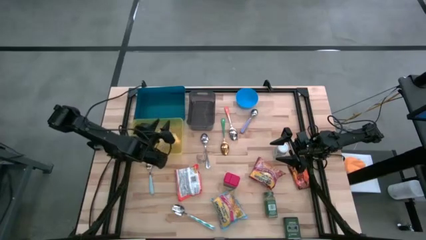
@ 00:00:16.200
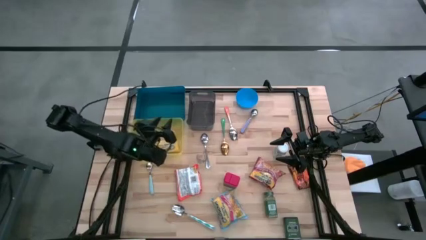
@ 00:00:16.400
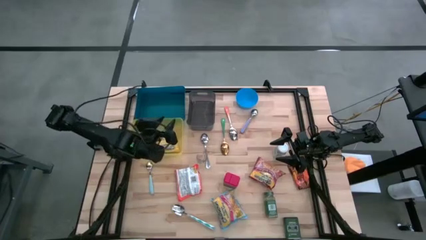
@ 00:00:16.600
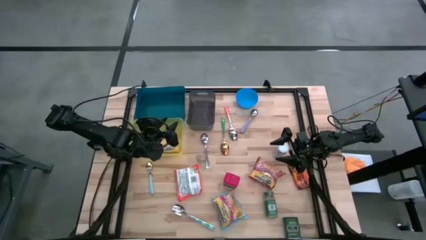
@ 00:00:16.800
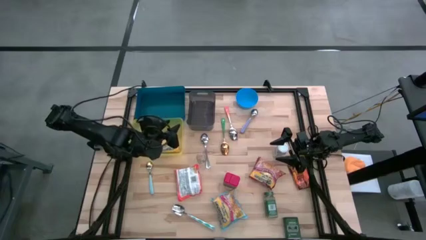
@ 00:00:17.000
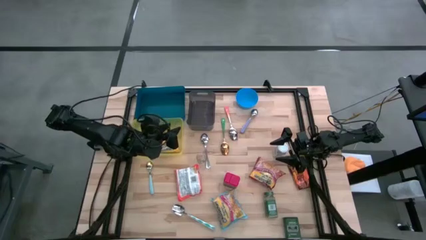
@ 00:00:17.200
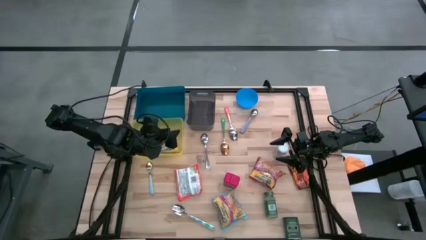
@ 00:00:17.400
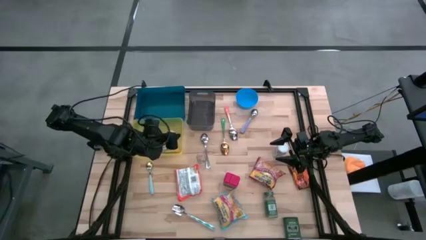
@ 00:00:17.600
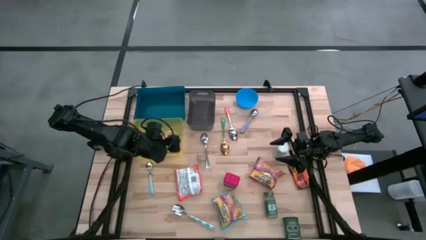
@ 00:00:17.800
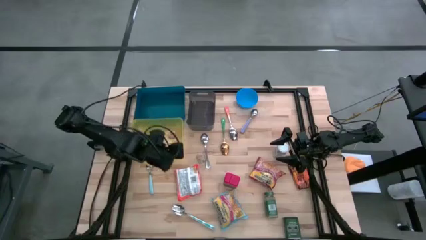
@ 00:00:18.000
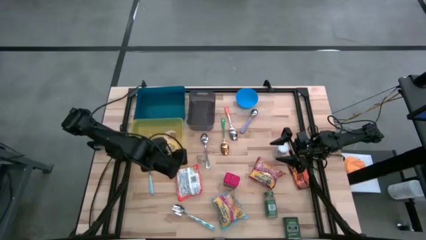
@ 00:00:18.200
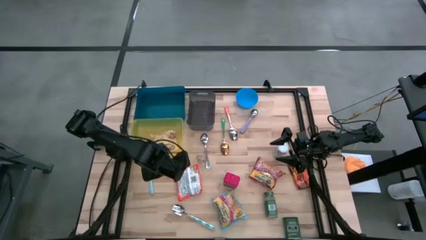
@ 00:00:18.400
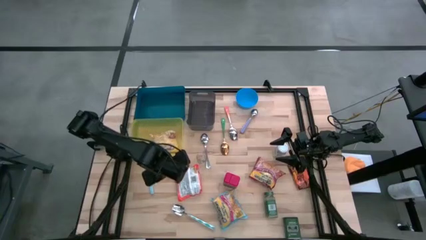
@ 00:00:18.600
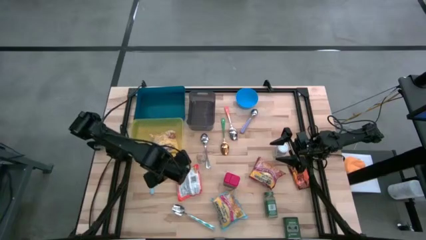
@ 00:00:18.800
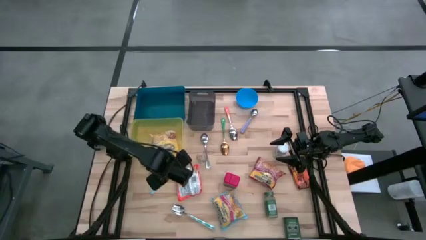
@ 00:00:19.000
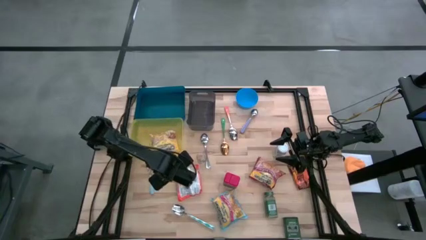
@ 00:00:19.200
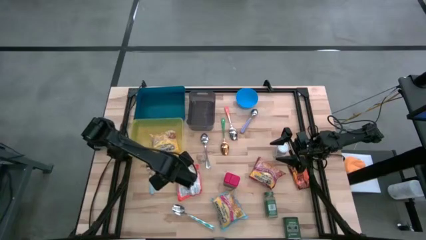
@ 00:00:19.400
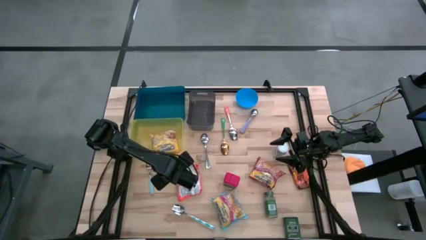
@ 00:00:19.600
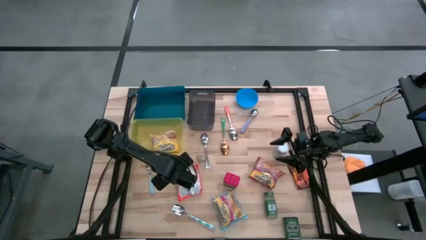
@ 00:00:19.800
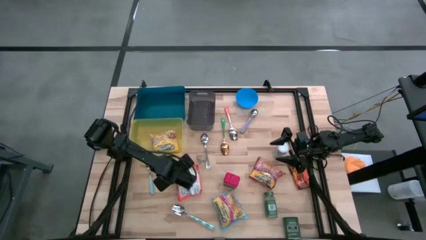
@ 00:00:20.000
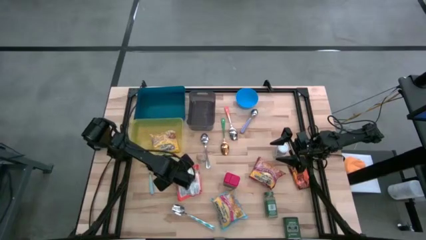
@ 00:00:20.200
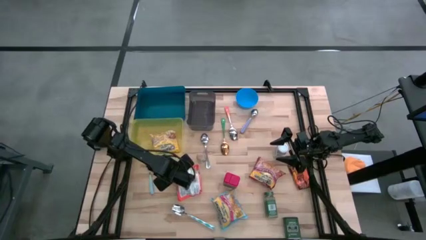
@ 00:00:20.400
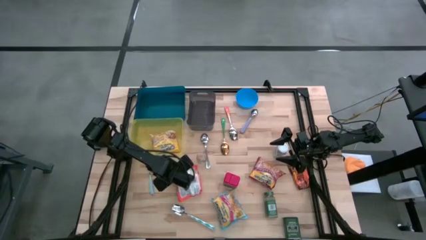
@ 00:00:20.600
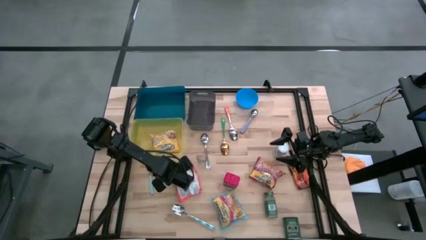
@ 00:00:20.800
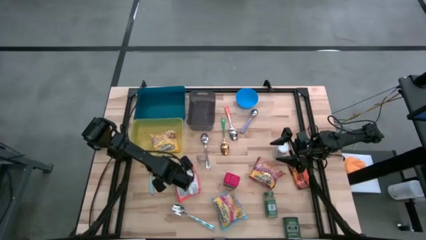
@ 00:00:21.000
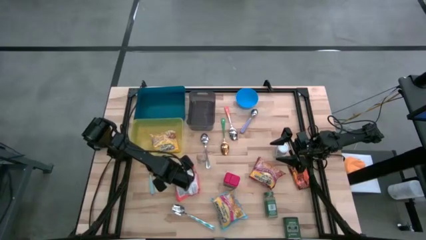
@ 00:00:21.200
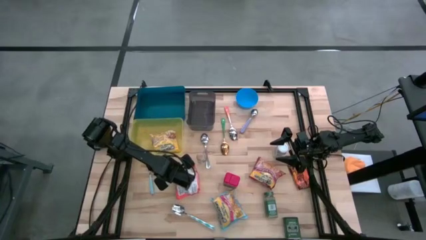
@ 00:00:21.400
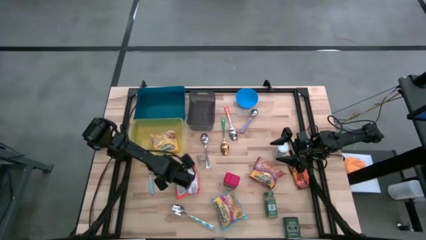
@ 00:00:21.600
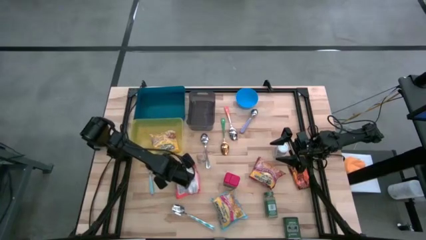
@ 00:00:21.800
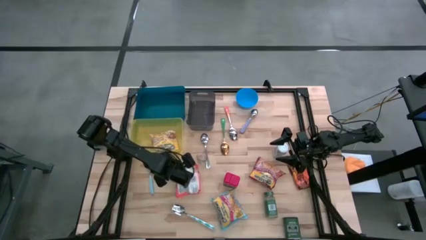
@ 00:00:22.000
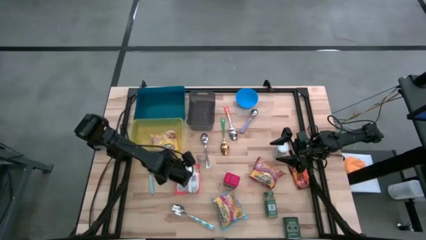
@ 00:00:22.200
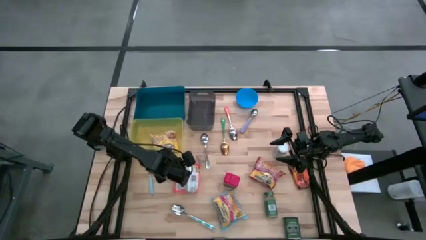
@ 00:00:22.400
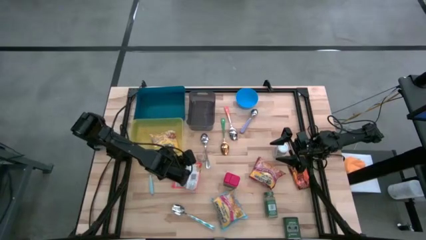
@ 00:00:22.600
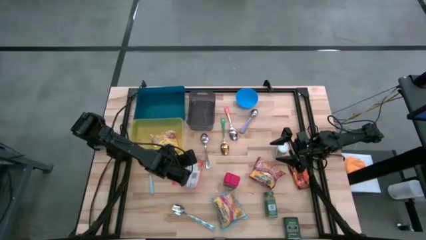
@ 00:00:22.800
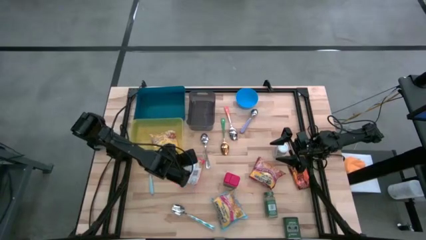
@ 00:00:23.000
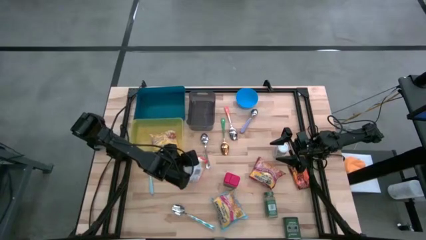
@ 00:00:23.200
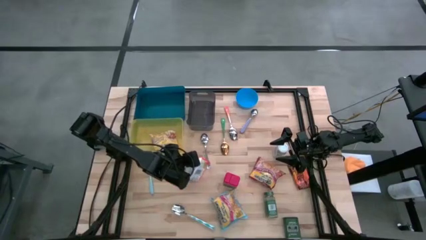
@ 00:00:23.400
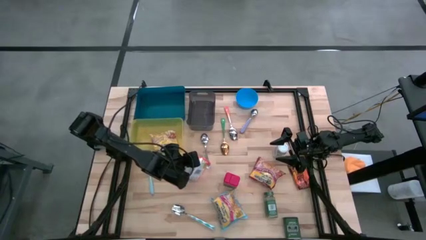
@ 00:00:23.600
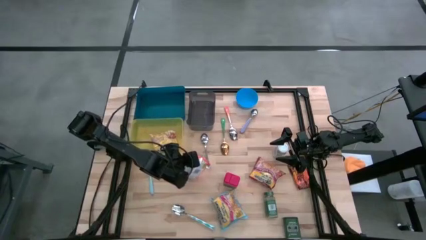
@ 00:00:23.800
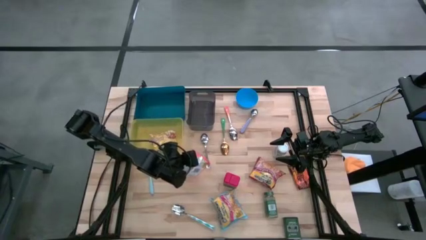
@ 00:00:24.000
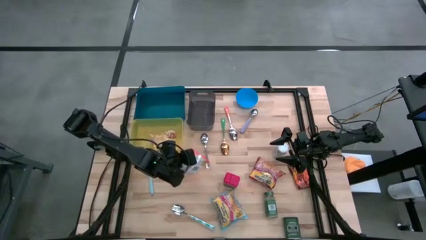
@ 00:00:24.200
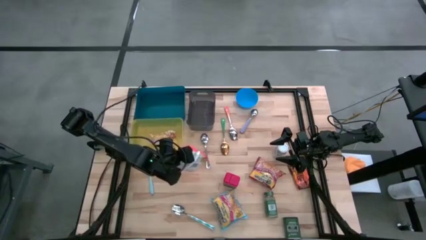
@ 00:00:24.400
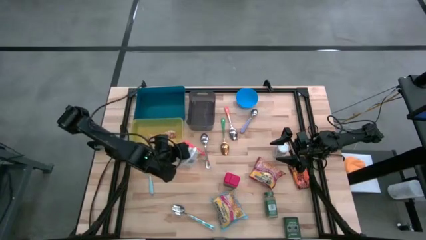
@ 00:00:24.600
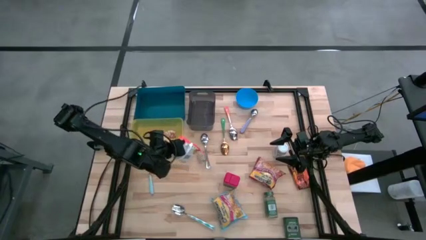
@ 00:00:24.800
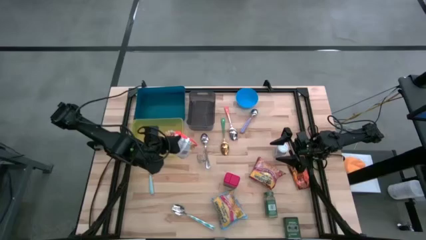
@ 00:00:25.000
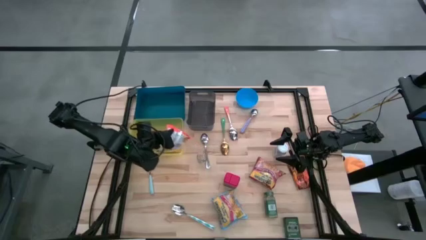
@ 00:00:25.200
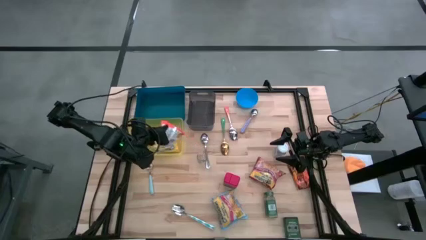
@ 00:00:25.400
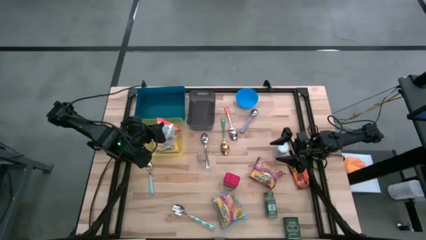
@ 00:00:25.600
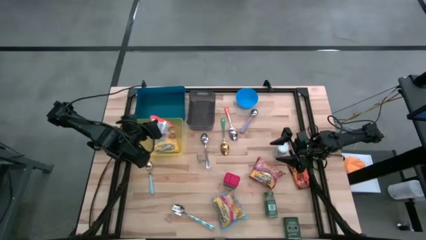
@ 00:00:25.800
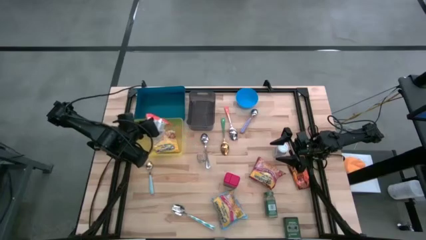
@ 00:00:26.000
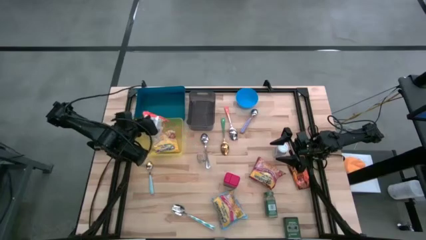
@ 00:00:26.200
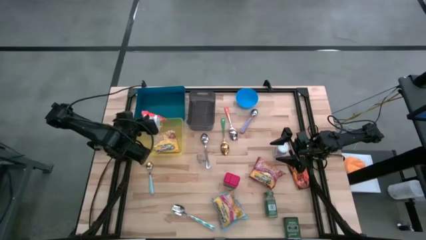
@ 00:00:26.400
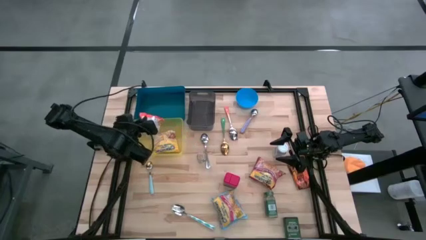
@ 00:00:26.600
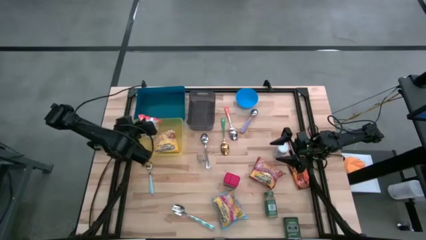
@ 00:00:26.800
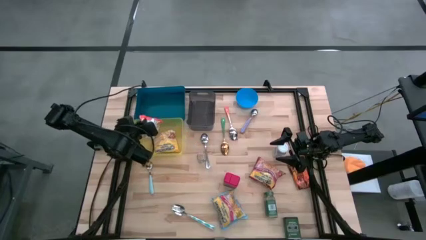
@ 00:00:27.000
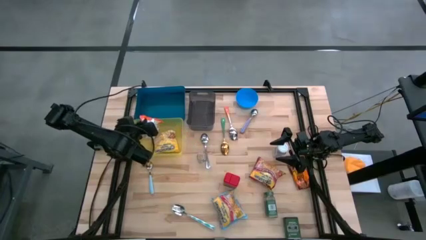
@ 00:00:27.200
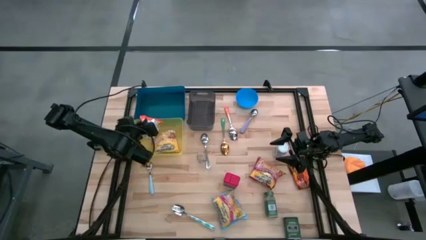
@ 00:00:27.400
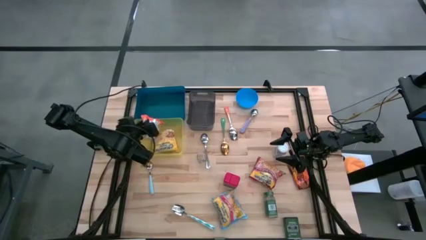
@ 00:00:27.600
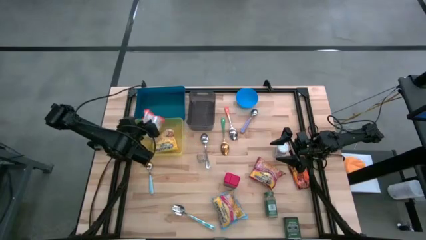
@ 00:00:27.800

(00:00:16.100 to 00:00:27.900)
Put the orange noodle pack into the yellow bin
